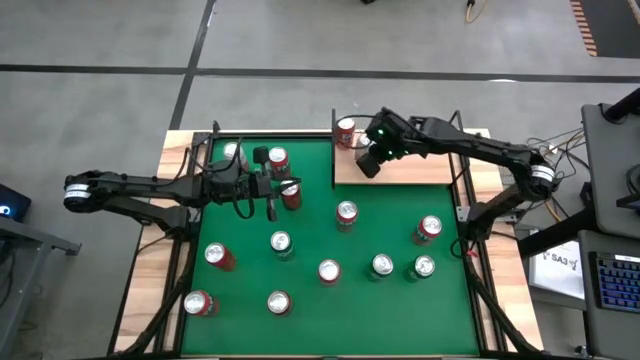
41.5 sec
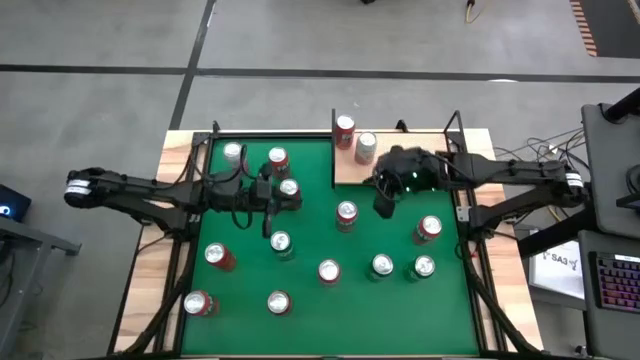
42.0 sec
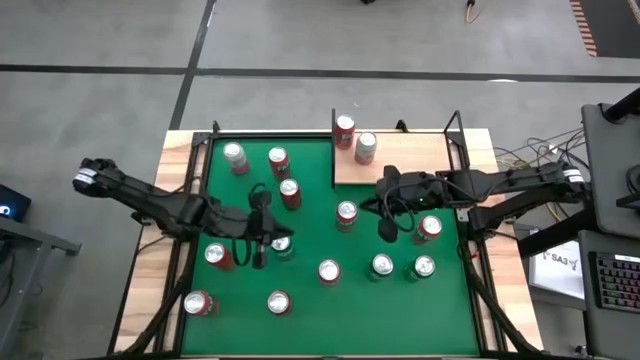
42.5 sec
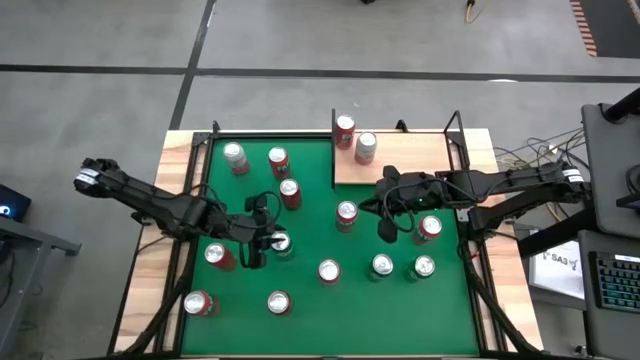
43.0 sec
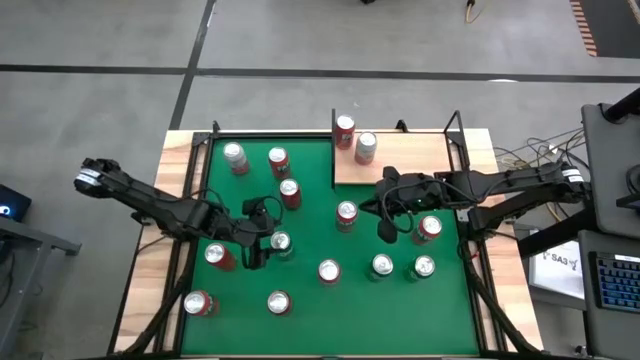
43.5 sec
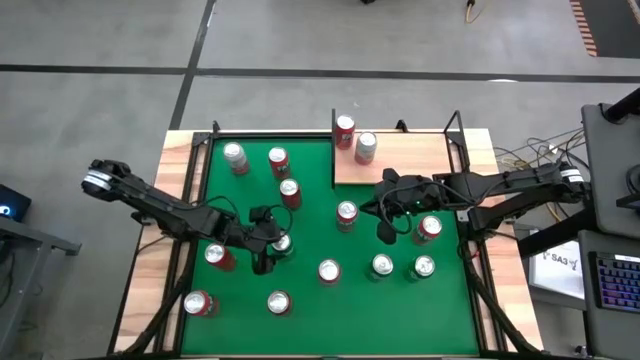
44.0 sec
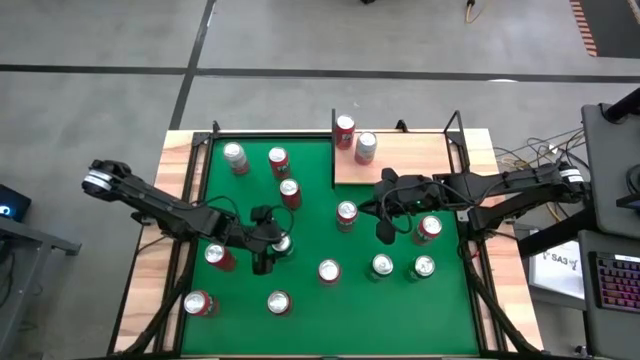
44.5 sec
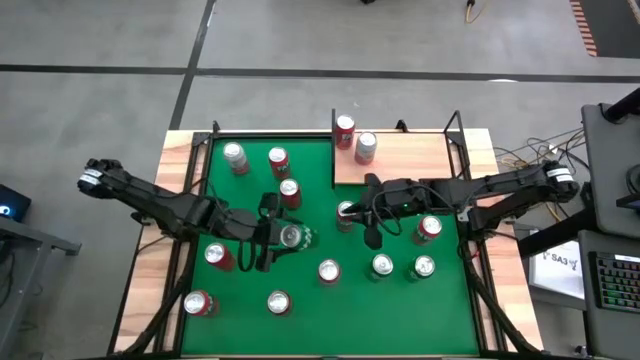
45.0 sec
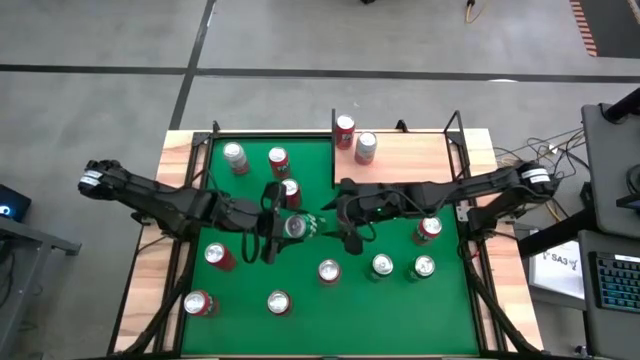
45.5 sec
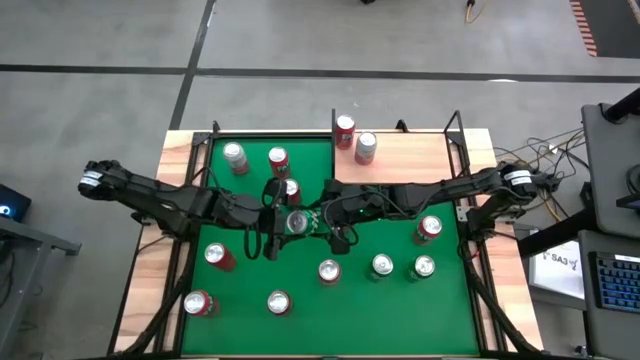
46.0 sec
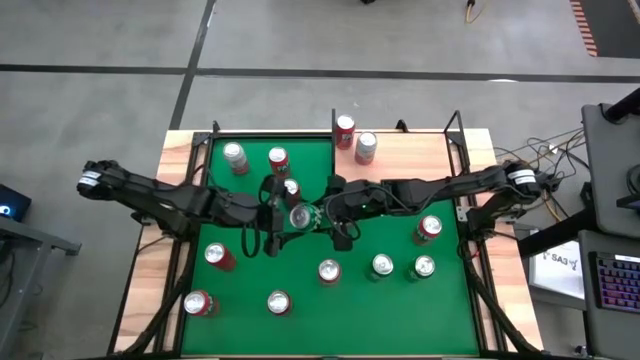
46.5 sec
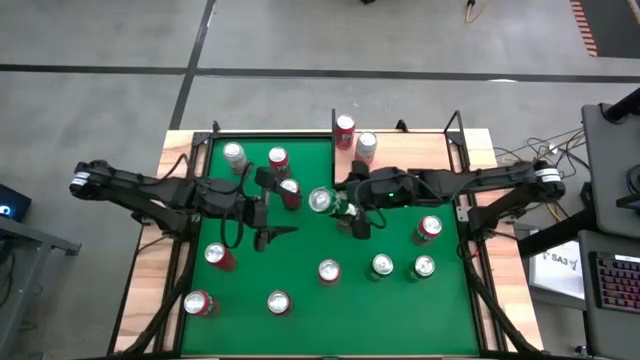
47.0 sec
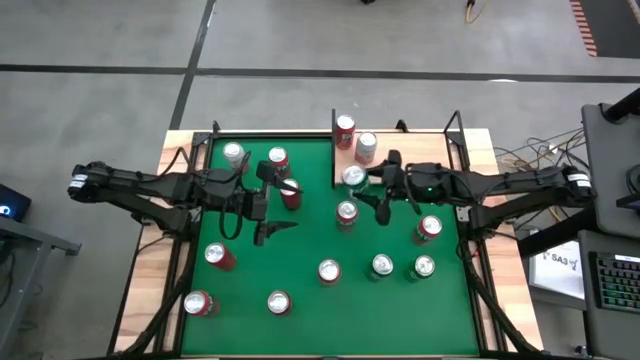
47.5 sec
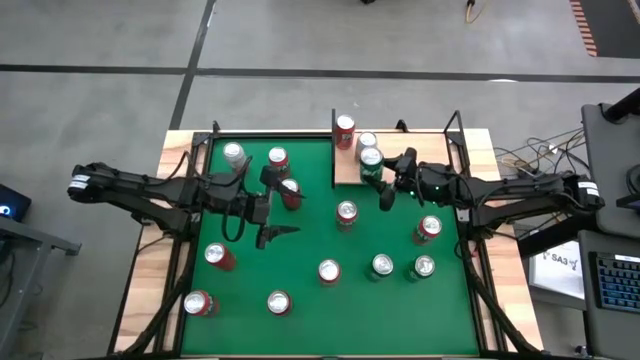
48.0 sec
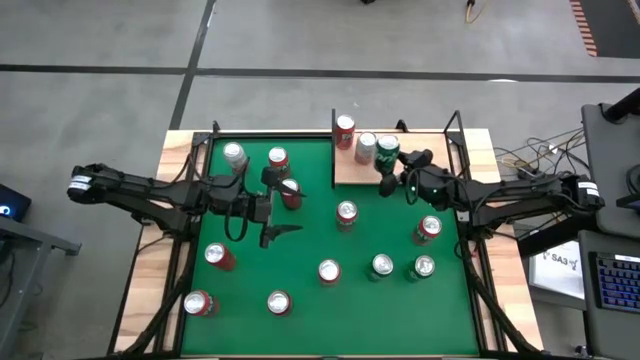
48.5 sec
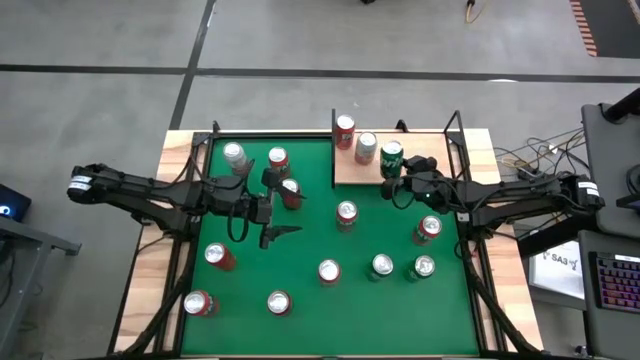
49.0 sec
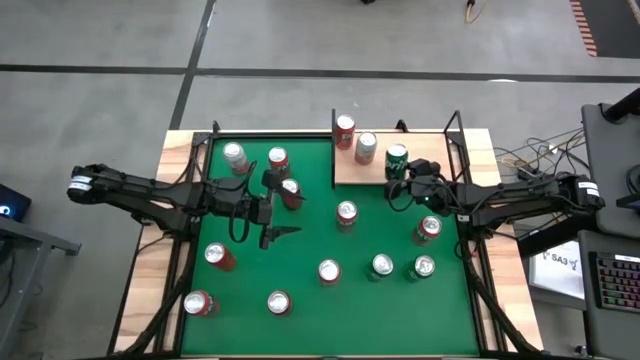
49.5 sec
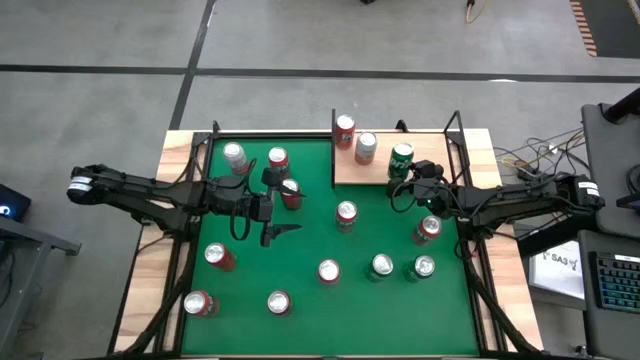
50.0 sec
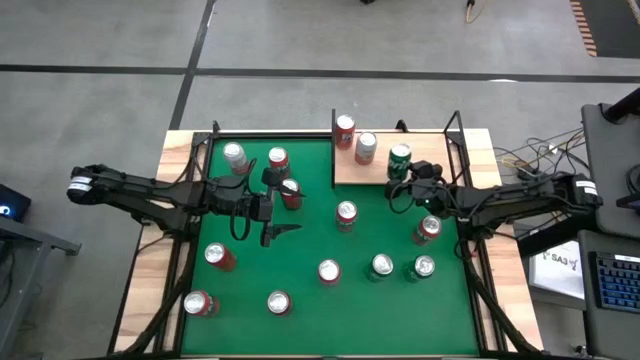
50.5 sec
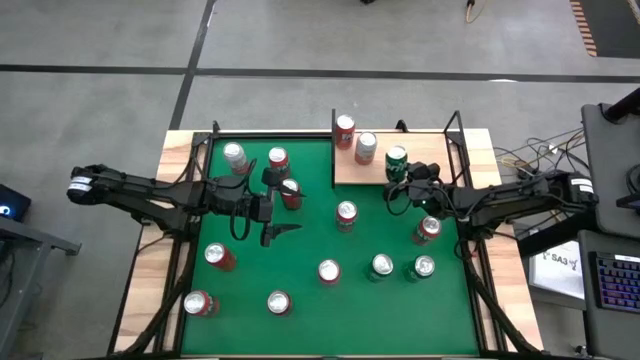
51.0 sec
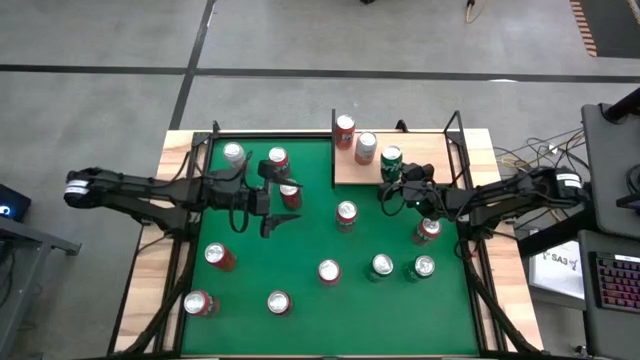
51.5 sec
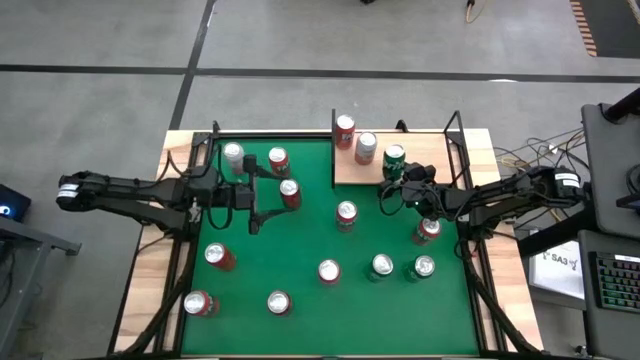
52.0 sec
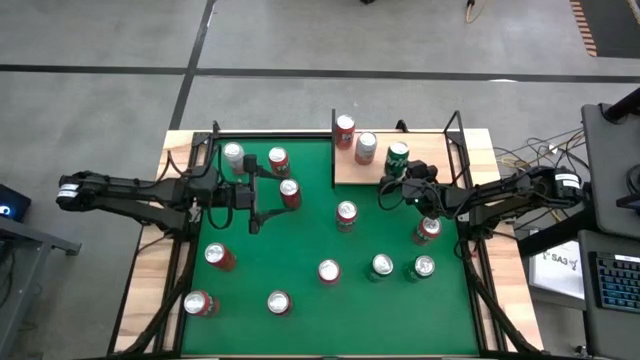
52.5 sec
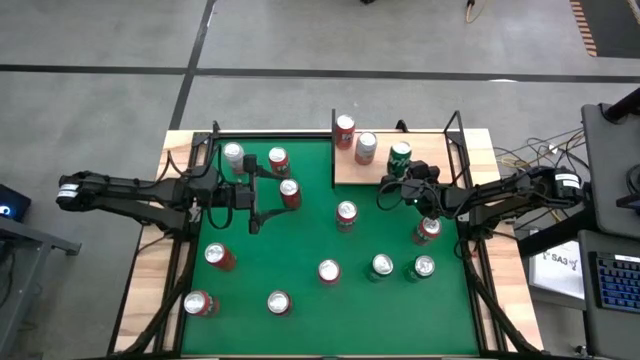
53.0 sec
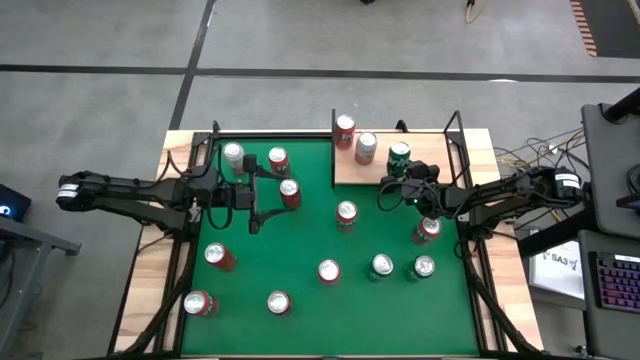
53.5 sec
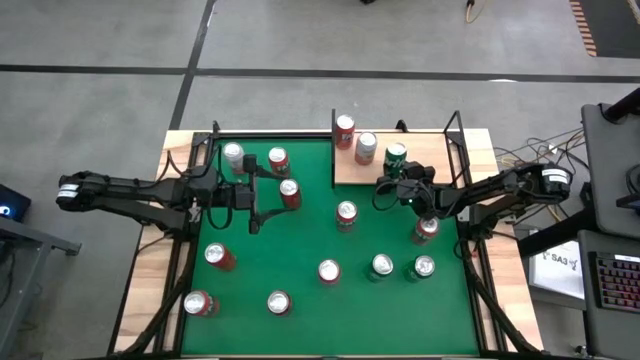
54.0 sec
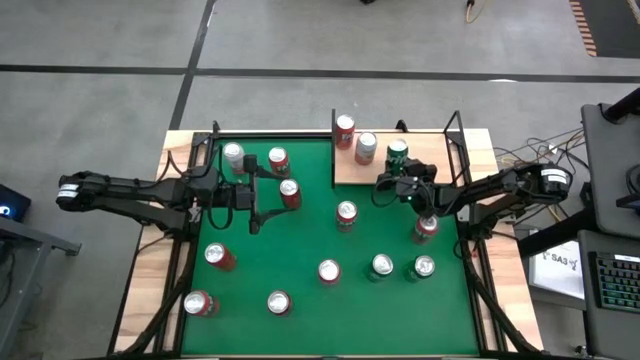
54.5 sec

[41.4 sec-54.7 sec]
Task: Place canned beverage on shelf
Put the left green soda can on the shelf

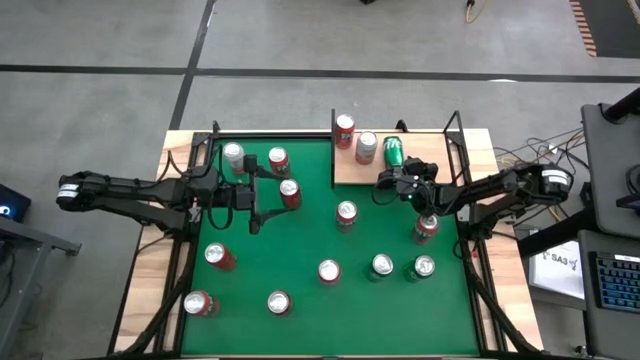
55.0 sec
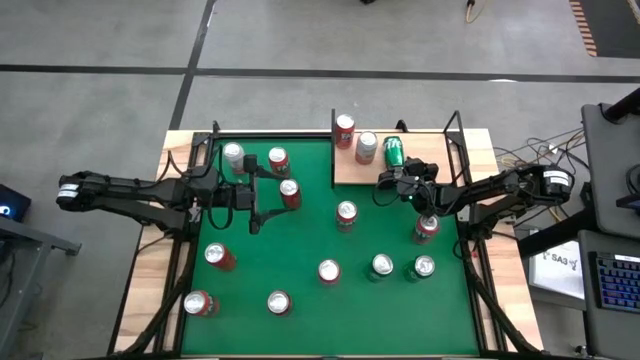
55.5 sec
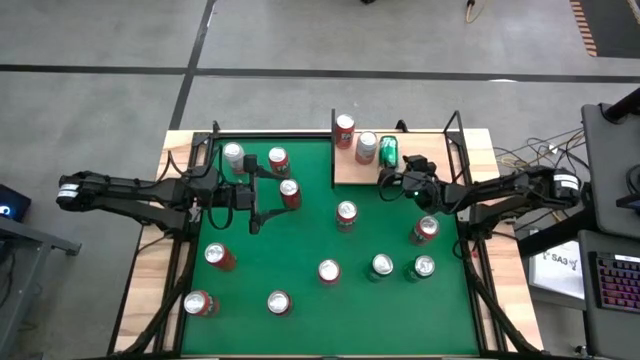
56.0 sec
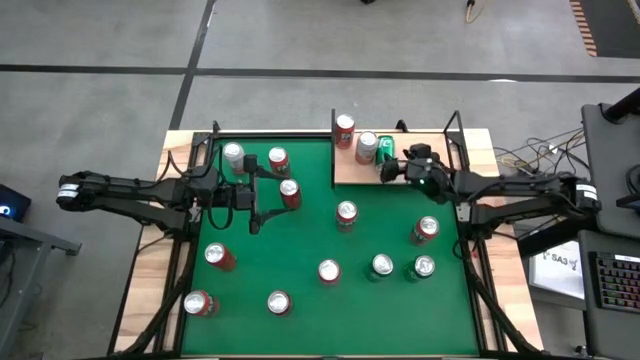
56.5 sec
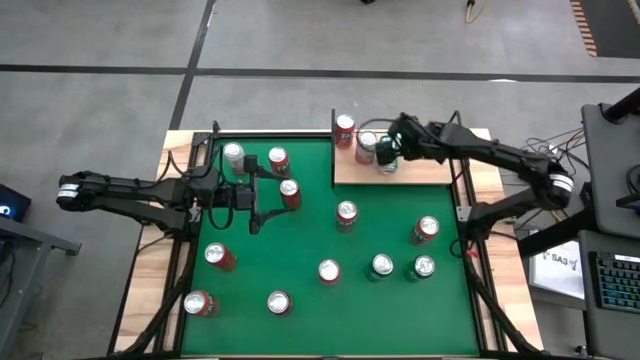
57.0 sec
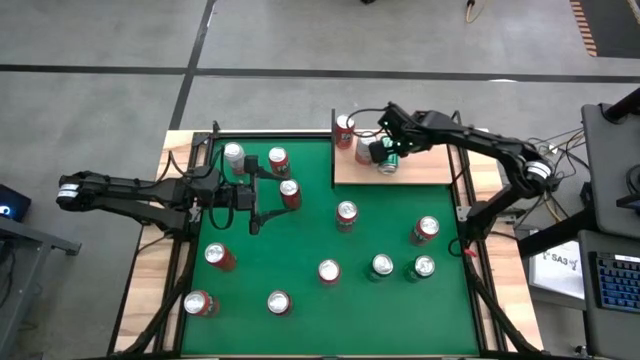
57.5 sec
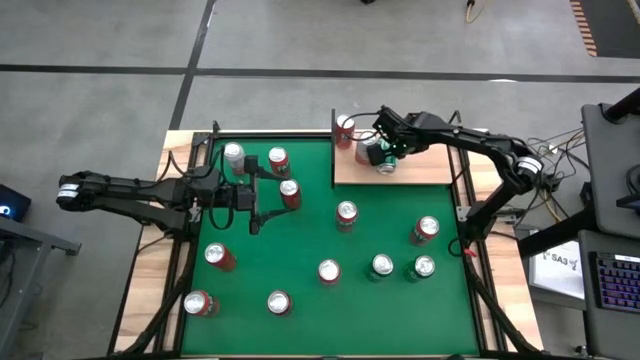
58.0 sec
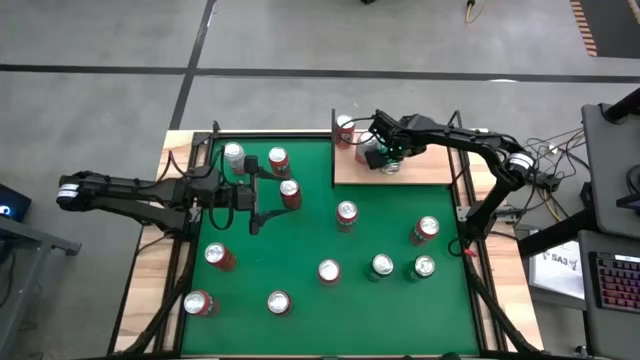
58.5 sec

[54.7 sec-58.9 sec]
Put the left green soda can on the shelf
